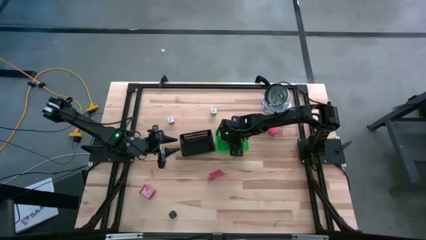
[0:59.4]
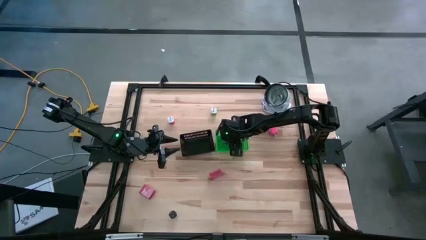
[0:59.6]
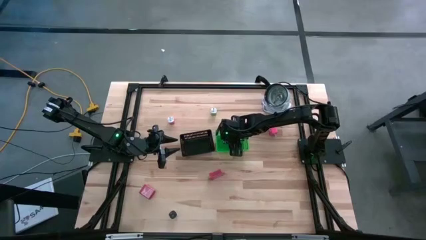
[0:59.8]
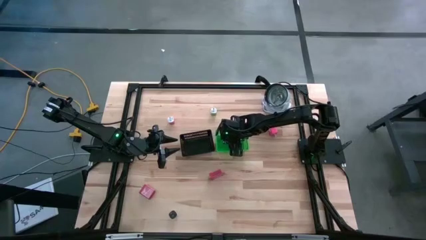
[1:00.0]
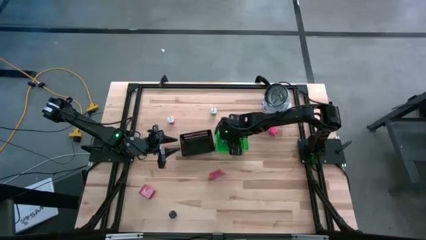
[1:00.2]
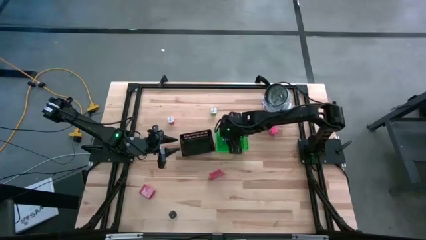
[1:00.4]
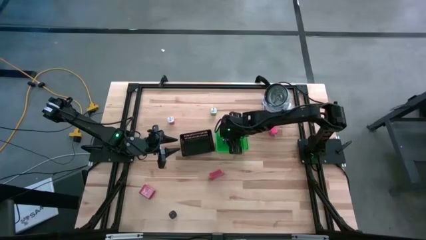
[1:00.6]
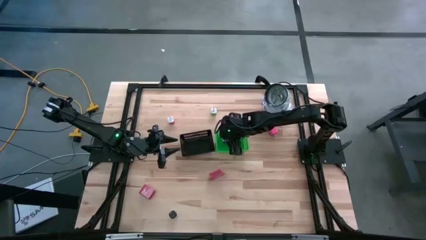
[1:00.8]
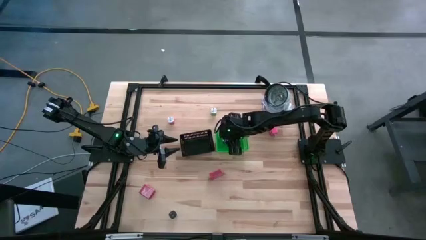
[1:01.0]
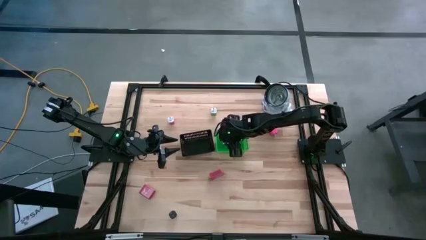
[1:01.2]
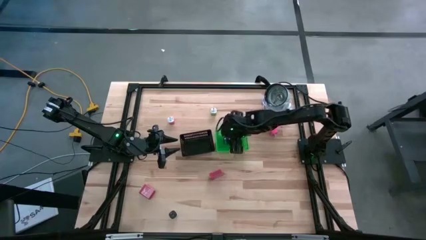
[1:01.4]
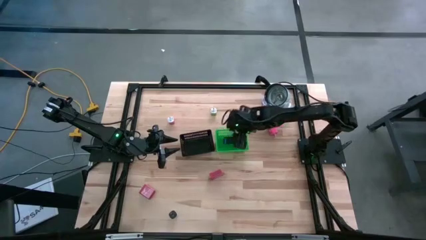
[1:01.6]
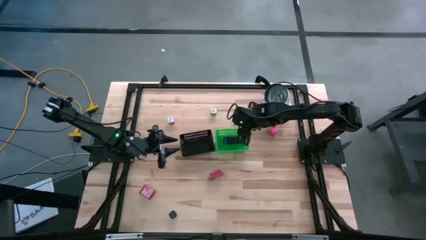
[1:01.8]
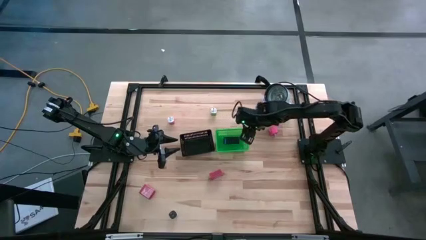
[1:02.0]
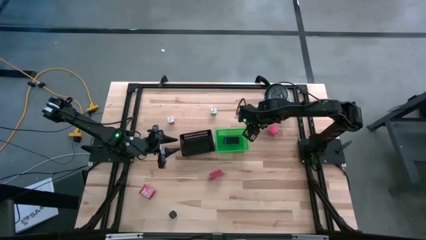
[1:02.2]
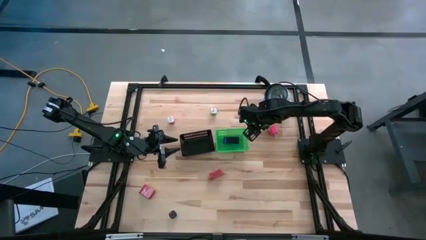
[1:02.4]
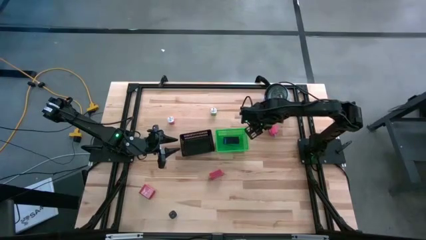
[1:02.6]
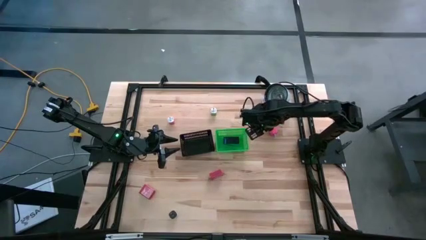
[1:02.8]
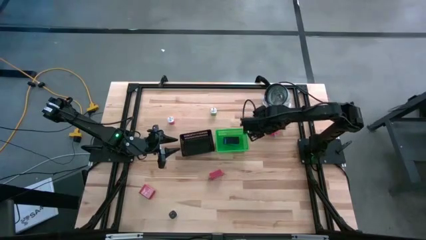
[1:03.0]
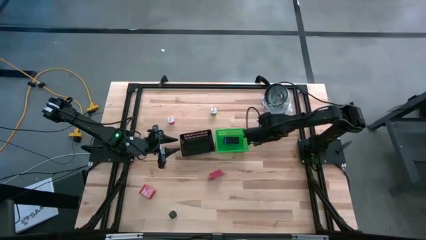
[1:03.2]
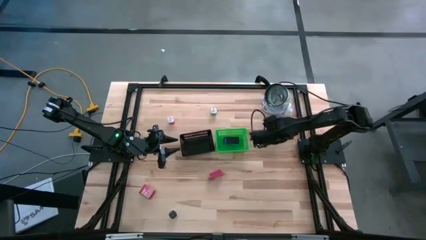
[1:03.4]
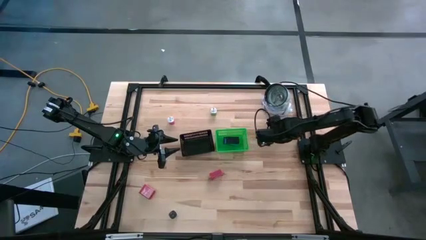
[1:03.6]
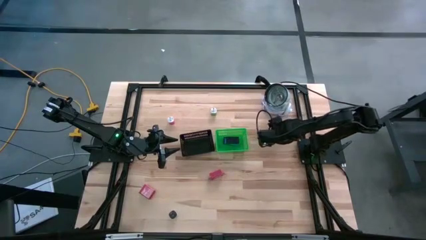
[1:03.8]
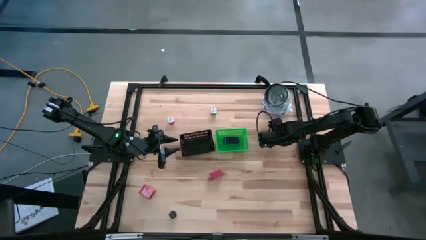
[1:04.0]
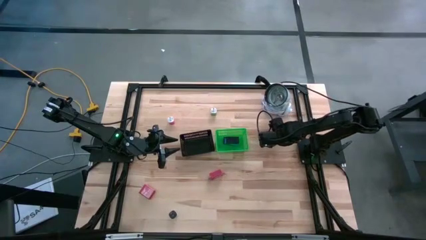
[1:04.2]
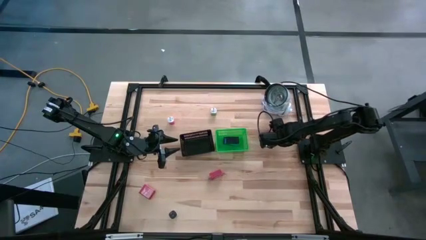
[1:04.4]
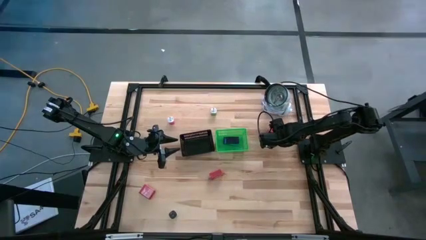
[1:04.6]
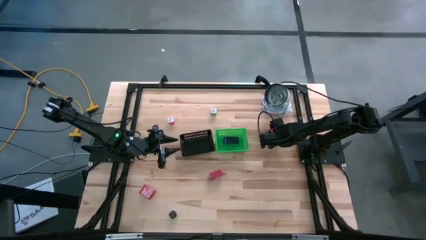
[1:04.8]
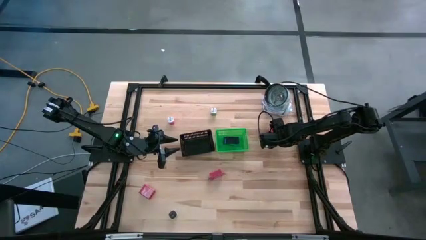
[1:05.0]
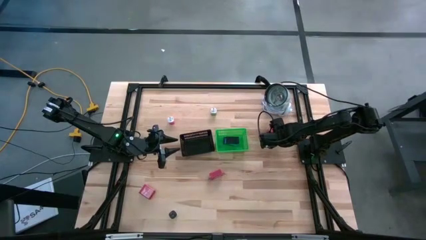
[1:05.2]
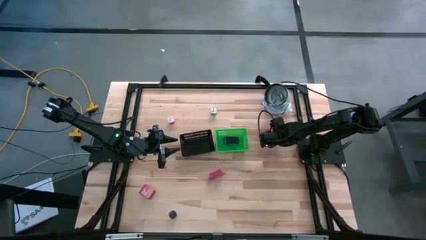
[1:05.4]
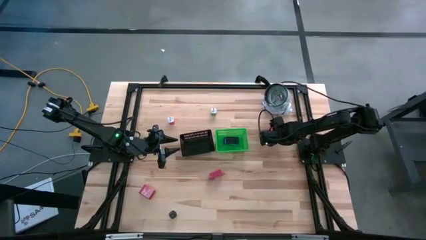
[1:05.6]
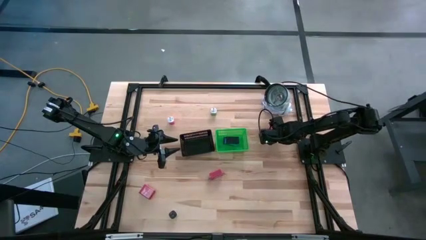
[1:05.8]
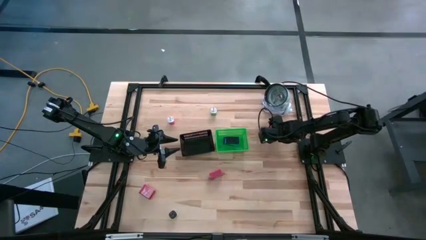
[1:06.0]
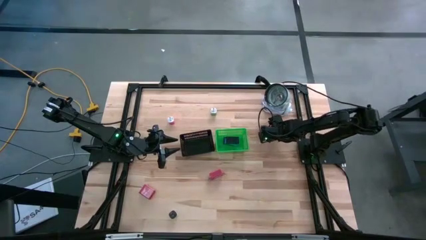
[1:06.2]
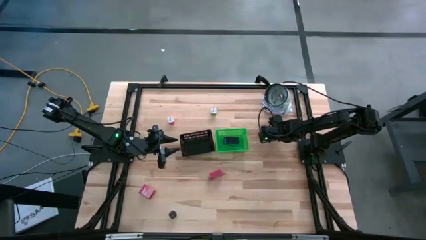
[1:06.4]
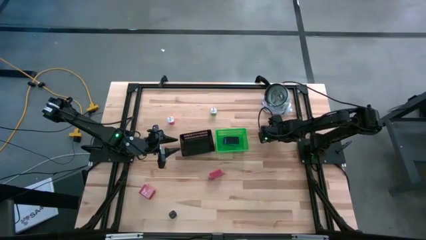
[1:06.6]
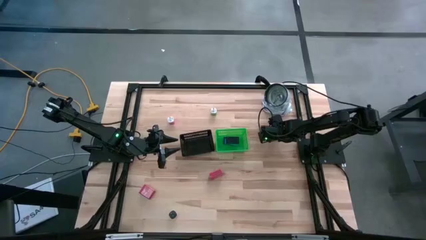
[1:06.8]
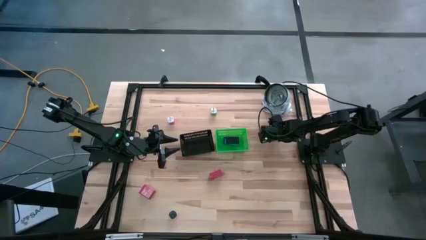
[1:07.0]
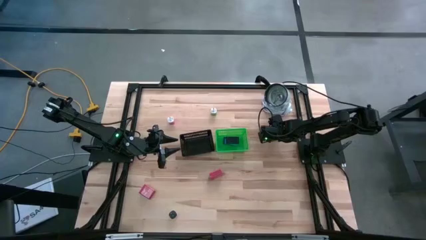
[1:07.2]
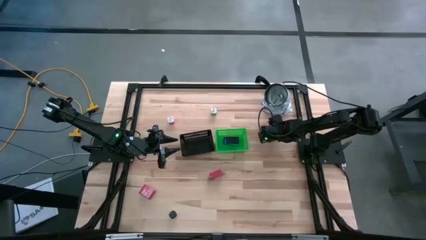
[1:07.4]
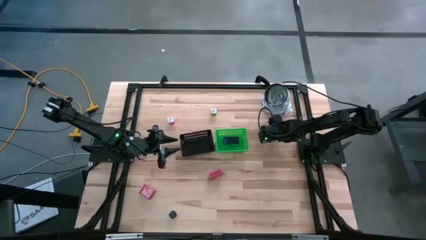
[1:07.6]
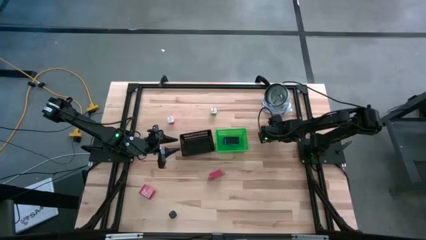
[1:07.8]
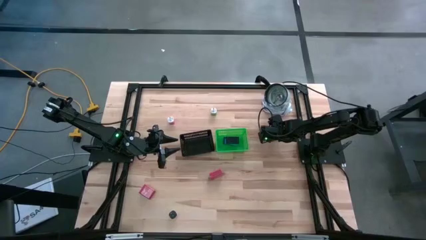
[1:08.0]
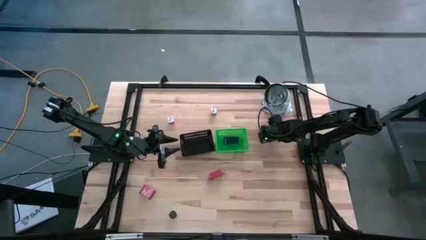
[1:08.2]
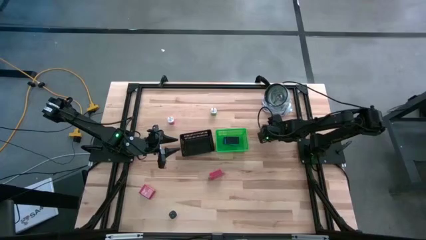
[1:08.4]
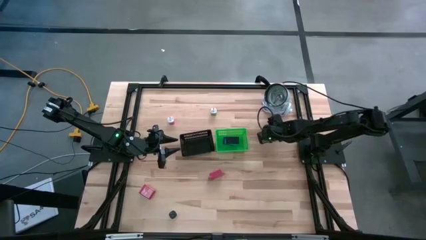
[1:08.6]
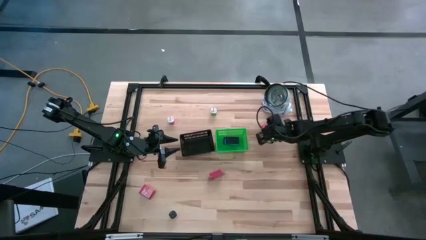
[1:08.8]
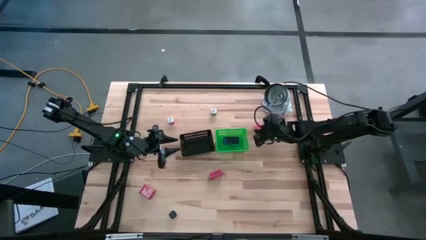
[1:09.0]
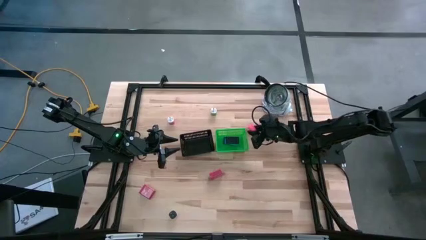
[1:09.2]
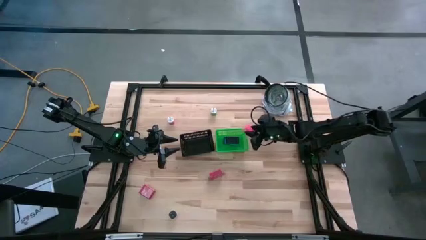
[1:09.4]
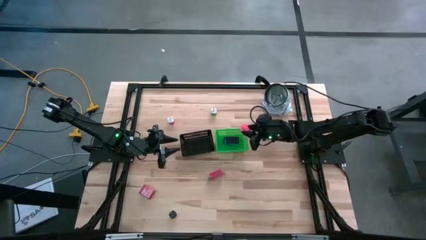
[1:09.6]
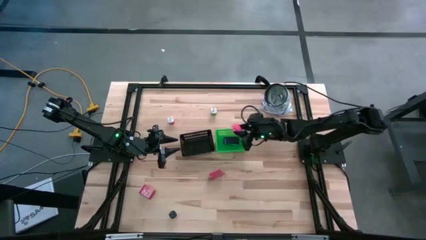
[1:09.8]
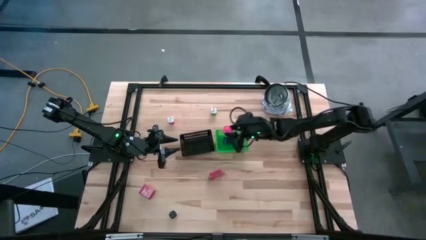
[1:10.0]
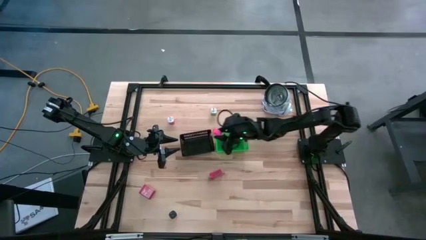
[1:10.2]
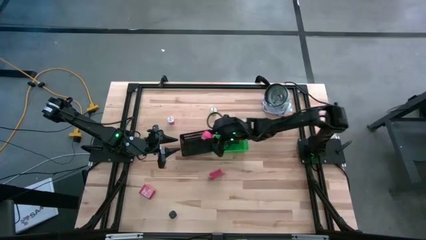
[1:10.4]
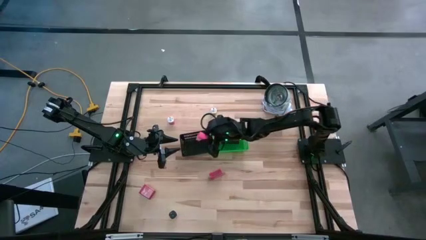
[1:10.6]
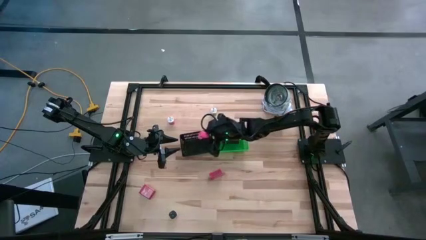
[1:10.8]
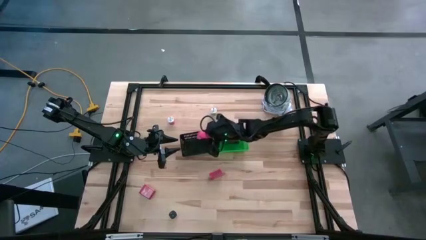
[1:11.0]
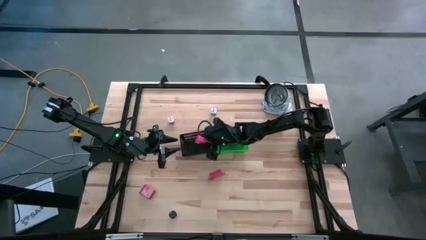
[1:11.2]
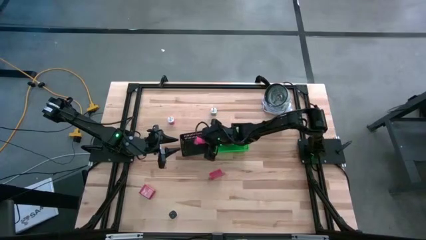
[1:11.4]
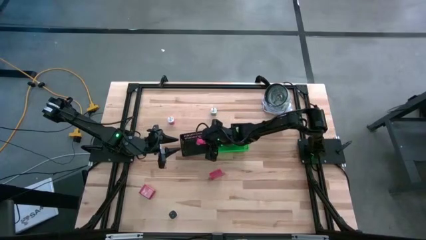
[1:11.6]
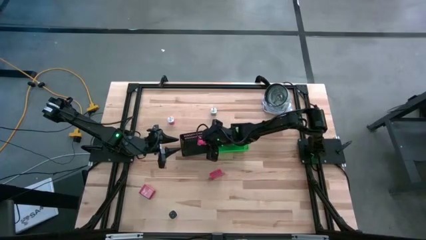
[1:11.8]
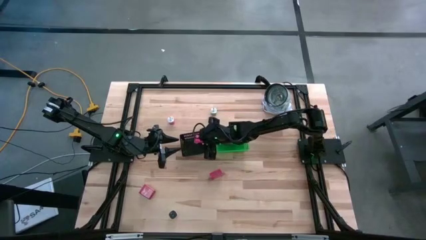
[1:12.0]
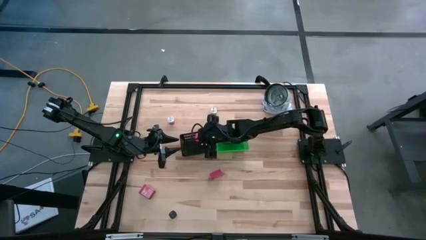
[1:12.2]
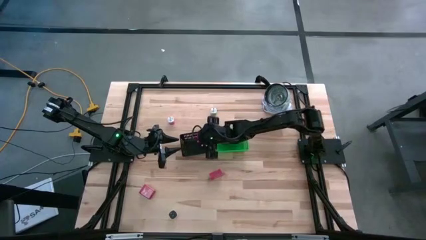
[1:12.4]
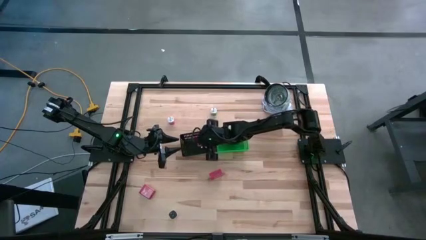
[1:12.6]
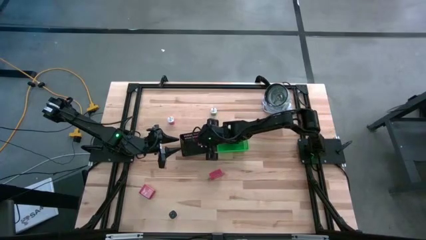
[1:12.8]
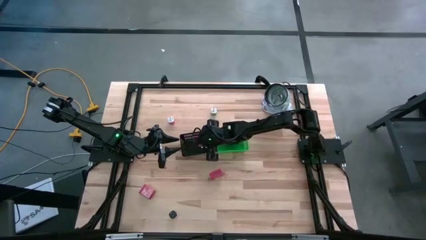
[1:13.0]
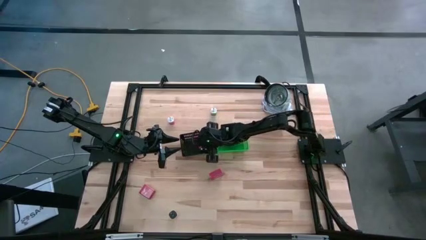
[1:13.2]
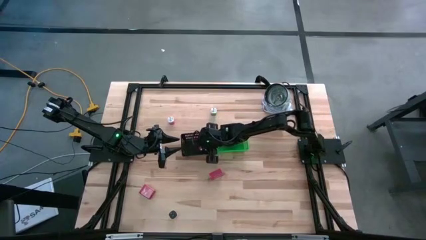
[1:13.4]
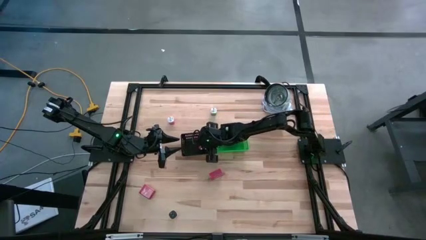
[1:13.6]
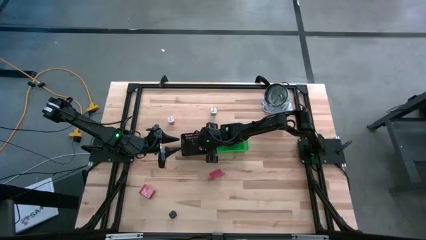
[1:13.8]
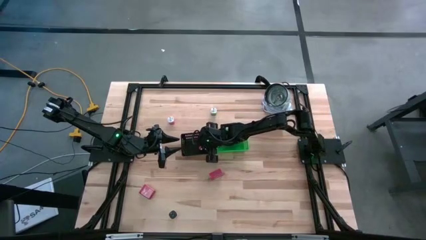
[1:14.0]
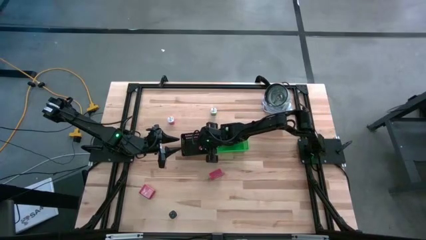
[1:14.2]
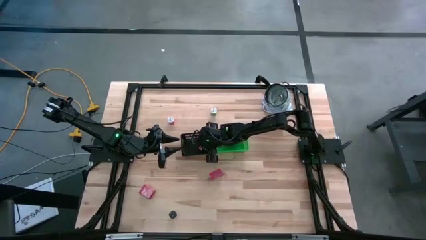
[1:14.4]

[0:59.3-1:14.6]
Task: Pick & Place Office items
Put the right pink charger adapter into the black bin

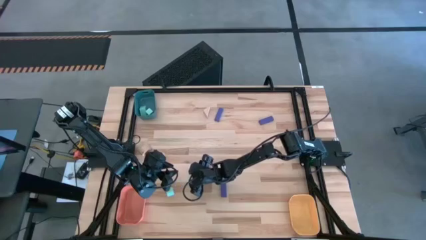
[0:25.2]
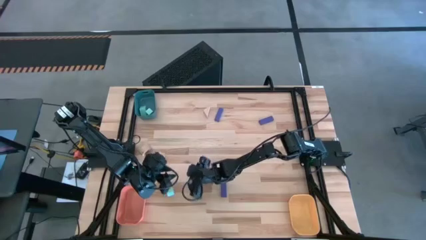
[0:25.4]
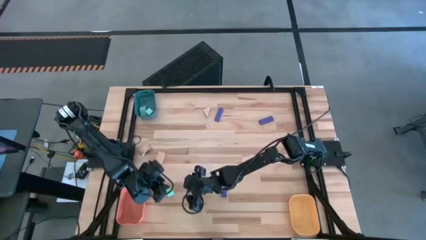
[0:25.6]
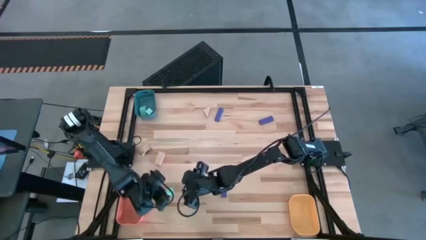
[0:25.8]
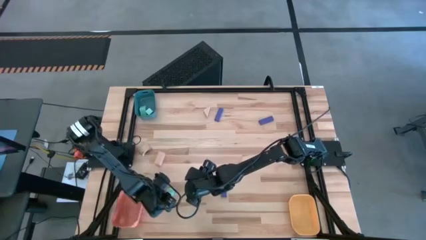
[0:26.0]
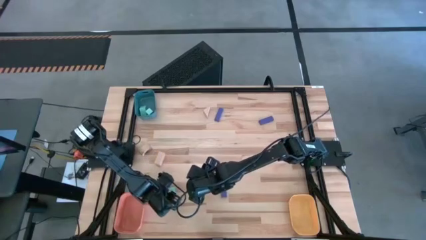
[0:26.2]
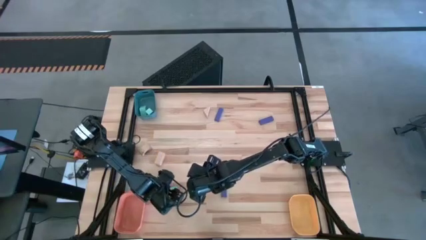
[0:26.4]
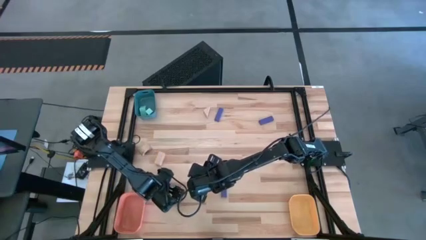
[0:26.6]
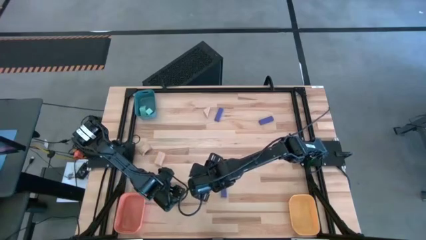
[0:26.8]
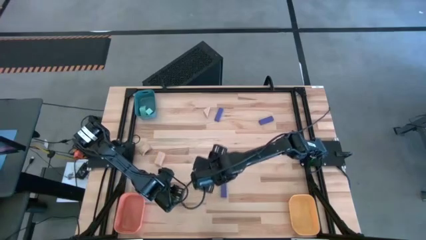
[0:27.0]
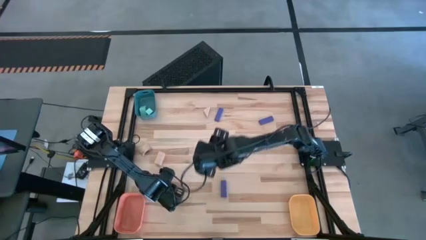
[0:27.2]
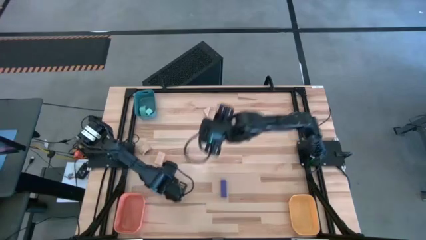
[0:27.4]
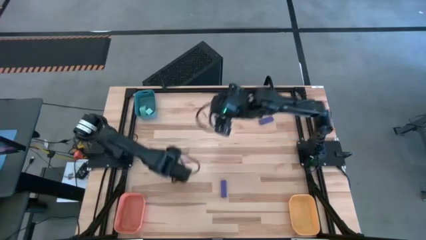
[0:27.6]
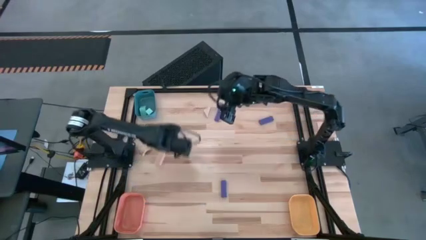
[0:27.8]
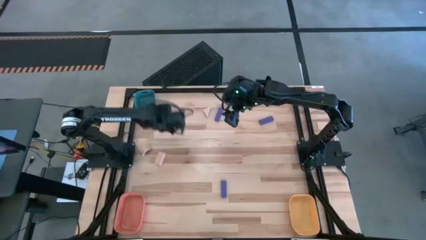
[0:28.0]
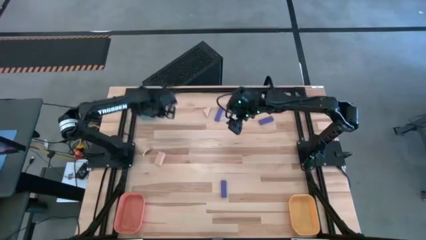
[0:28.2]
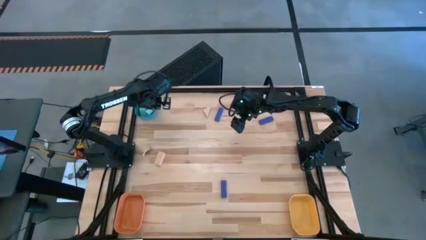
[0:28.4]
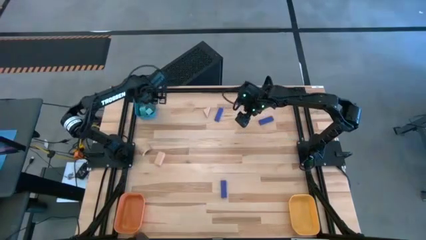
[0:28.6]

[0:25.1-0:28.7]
Task: Sort & place blocks by color
Put the light blue block into the blue bin
